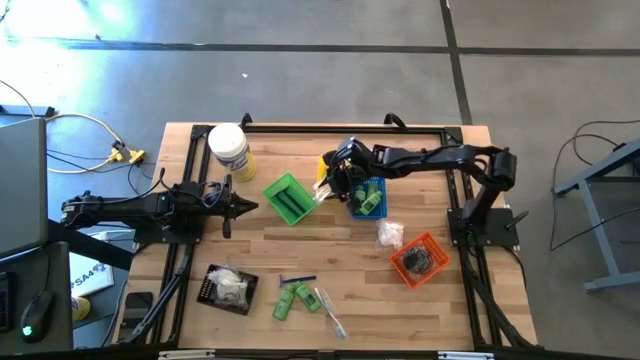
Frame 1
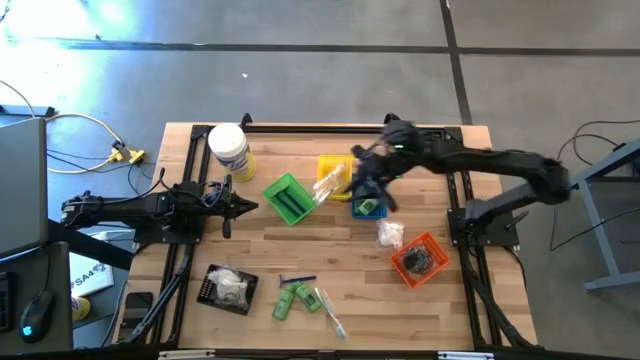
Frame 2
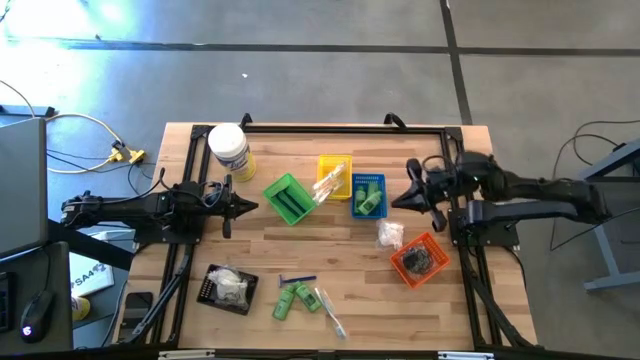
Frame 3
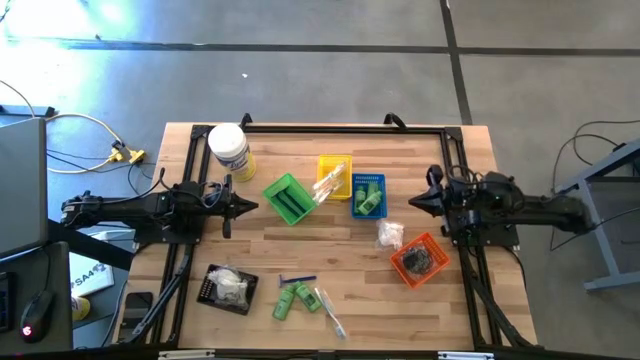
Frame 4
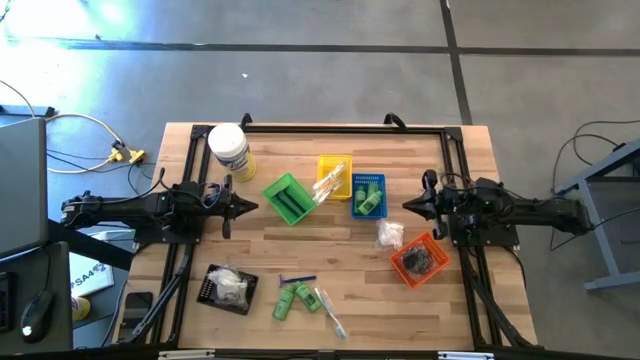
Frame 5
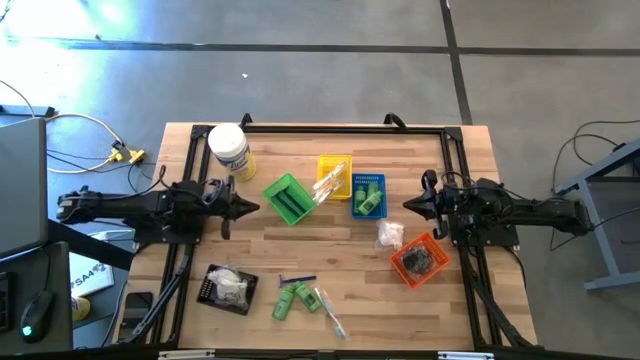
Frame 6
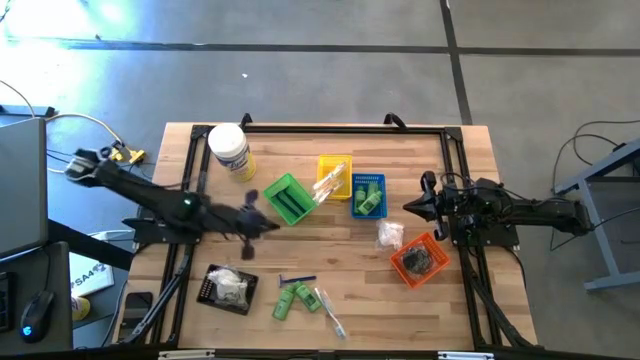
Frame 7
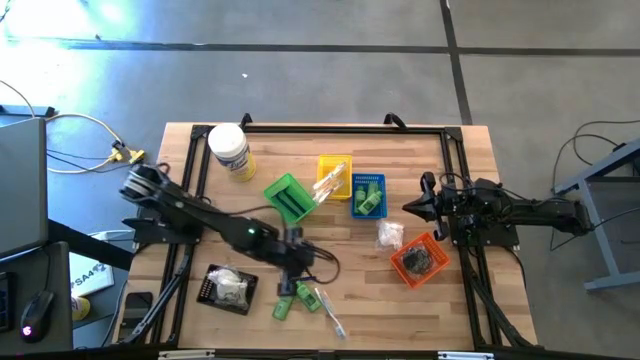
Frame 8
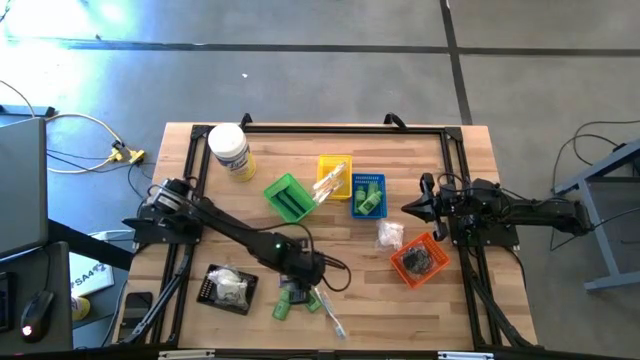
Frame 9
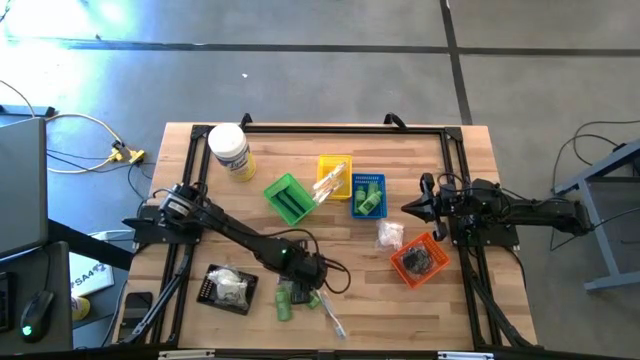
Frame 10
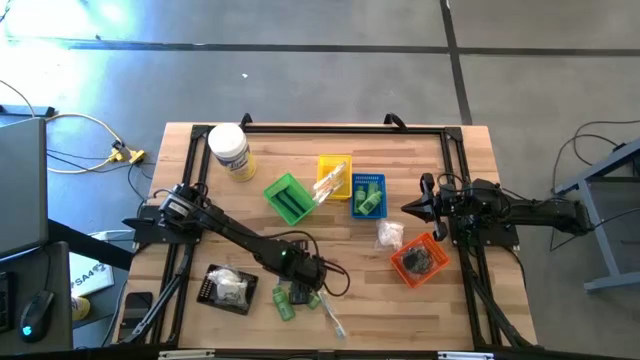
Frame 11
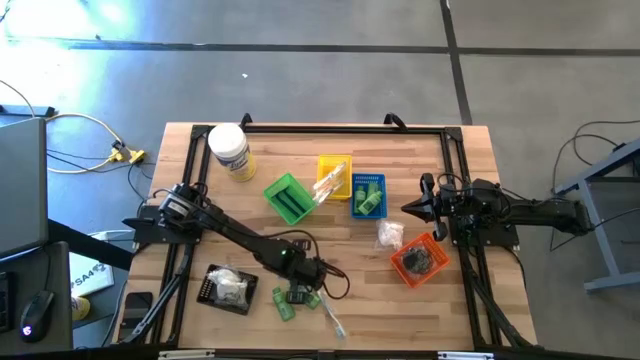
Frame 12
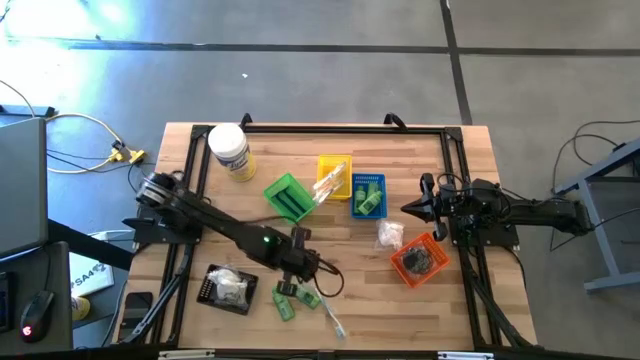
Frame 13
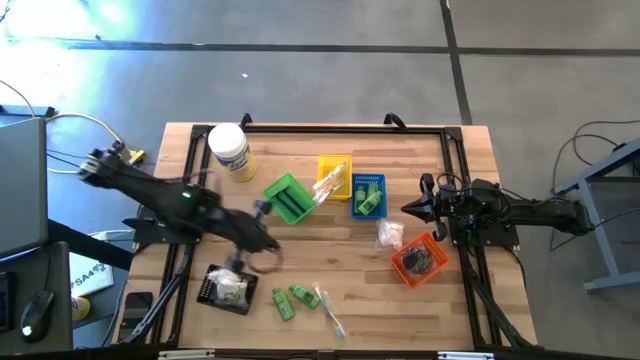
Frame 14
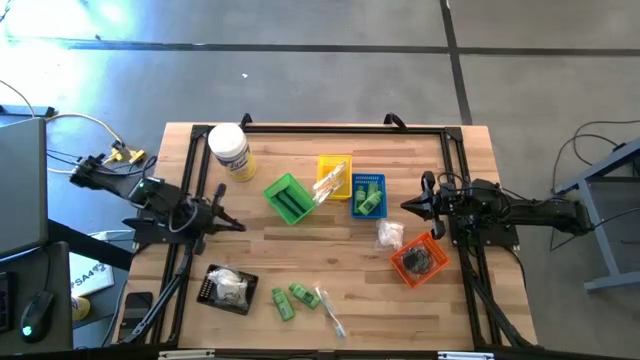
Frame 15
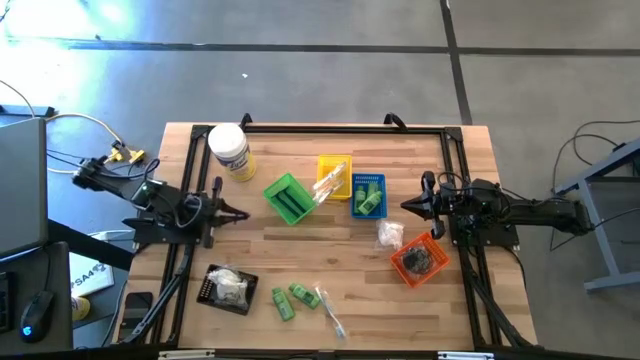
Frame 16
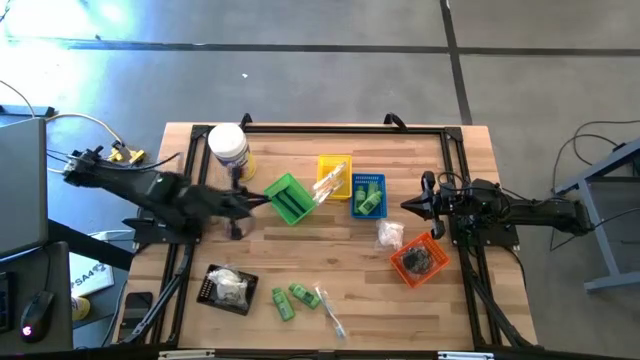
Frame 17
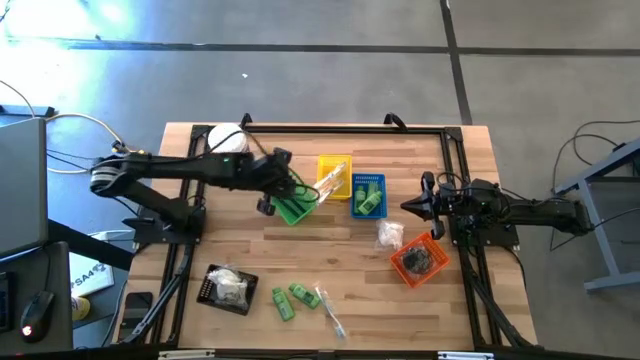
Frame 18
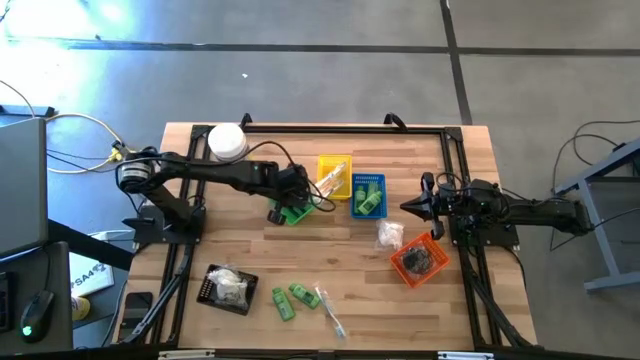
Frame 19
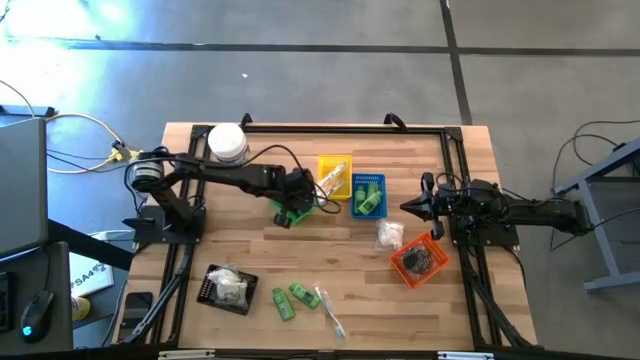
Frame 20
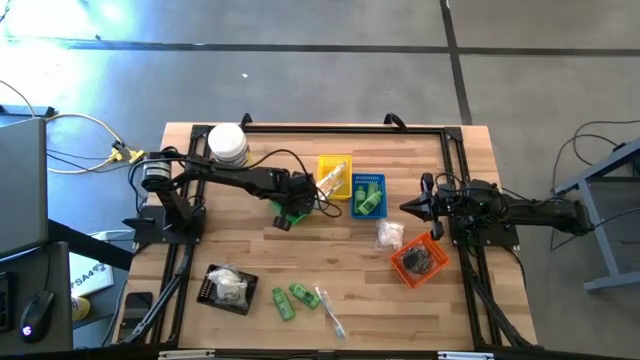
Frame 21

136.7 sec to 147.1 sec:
Task: Pick & Place Travel size toiletries
Put the blue razor into the green basket

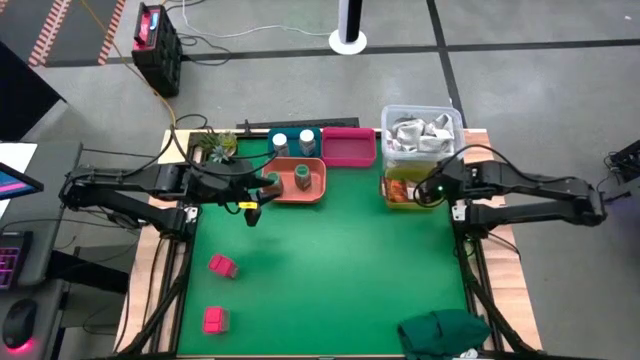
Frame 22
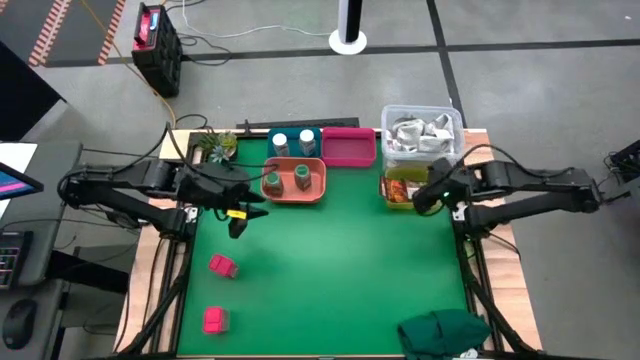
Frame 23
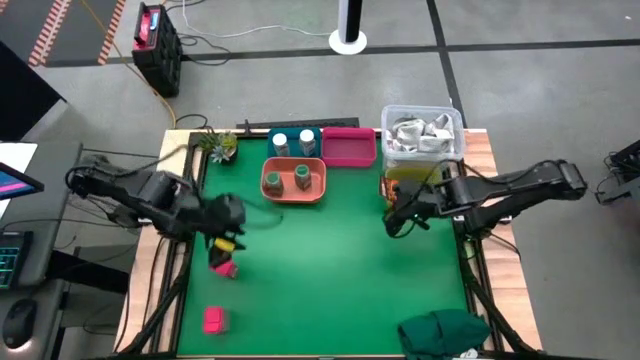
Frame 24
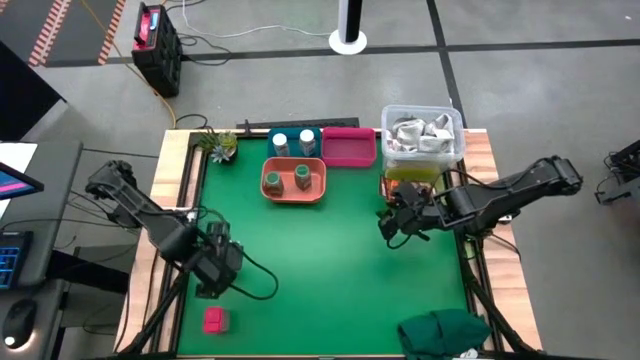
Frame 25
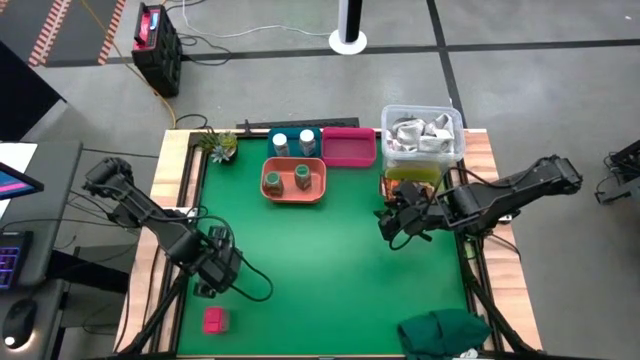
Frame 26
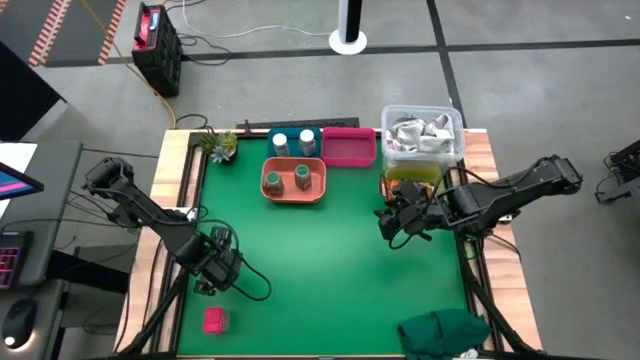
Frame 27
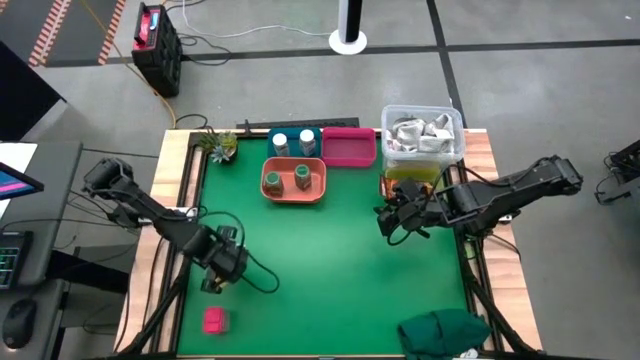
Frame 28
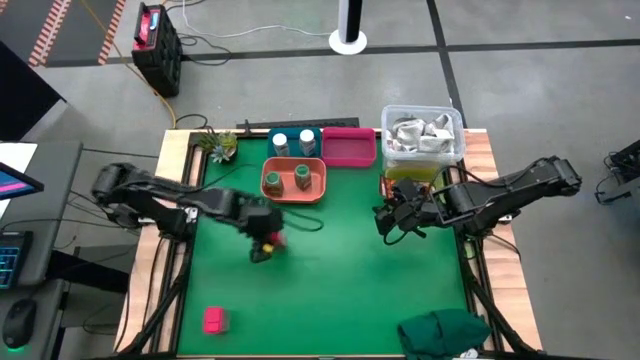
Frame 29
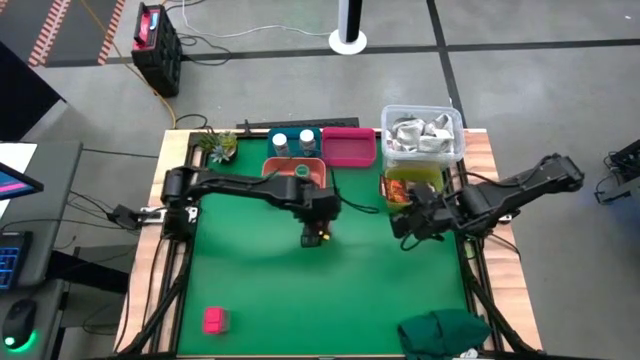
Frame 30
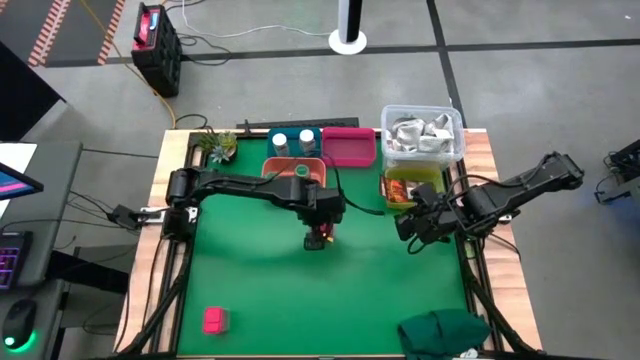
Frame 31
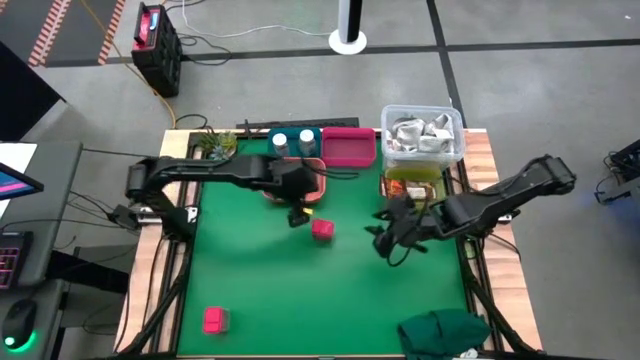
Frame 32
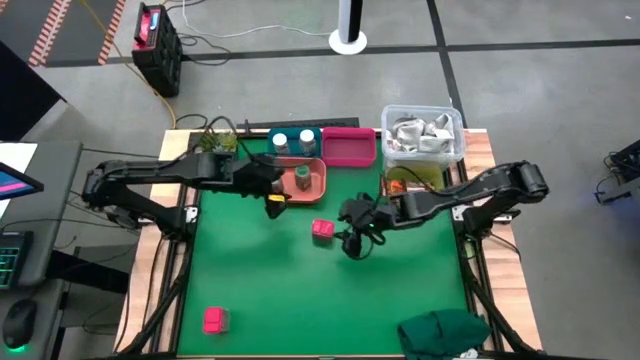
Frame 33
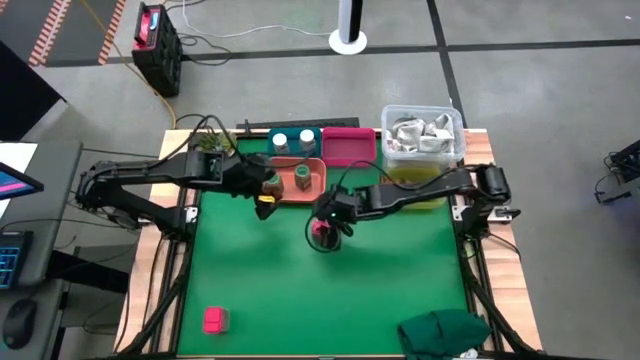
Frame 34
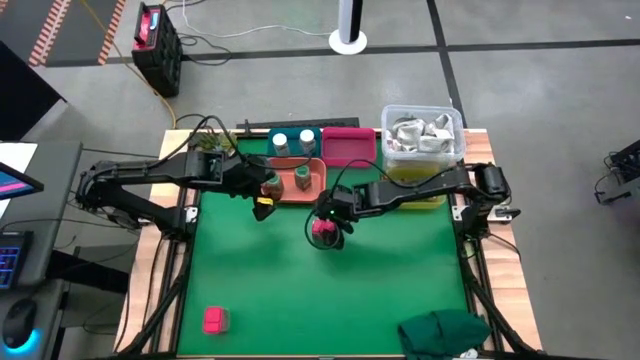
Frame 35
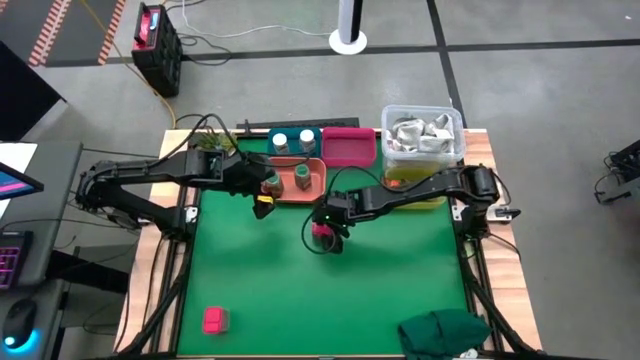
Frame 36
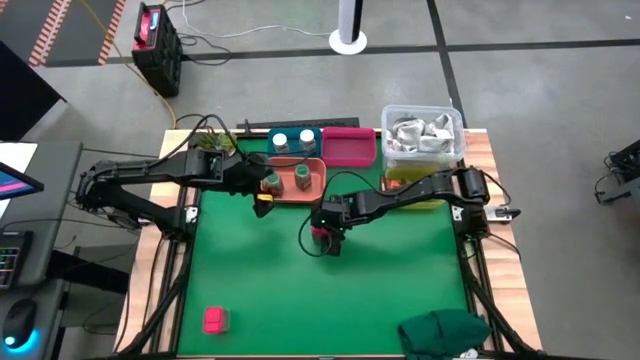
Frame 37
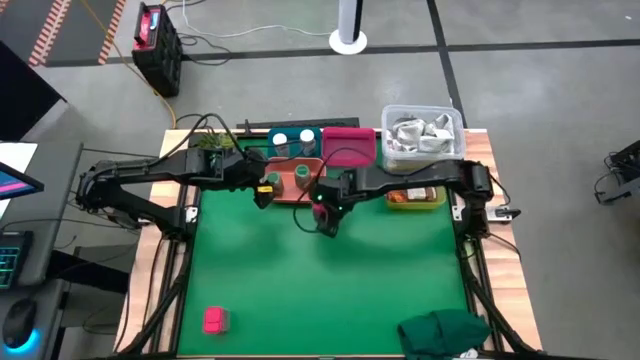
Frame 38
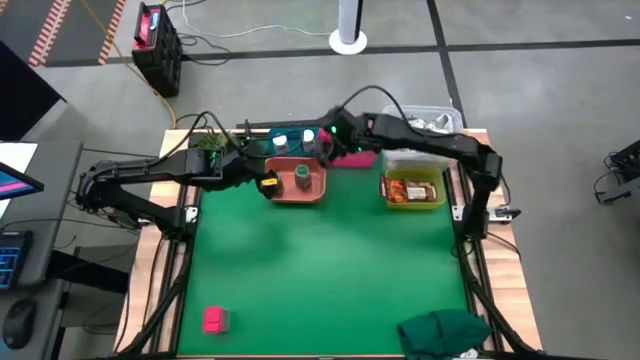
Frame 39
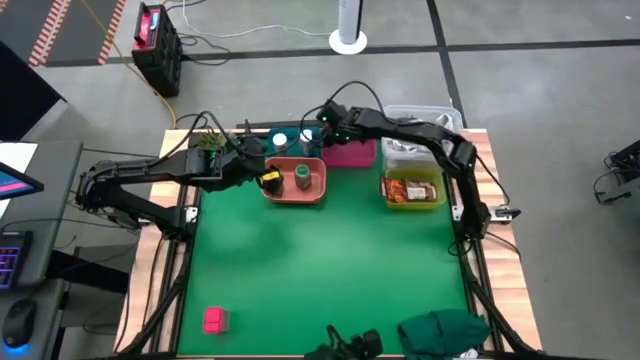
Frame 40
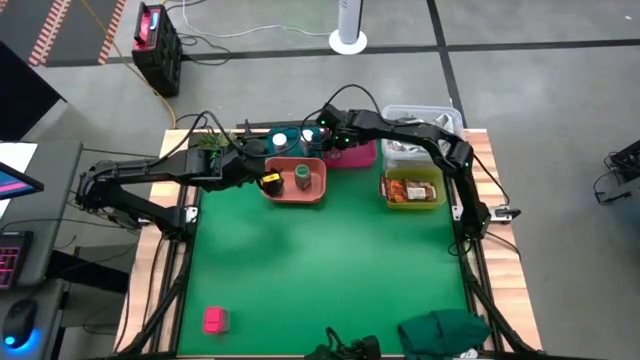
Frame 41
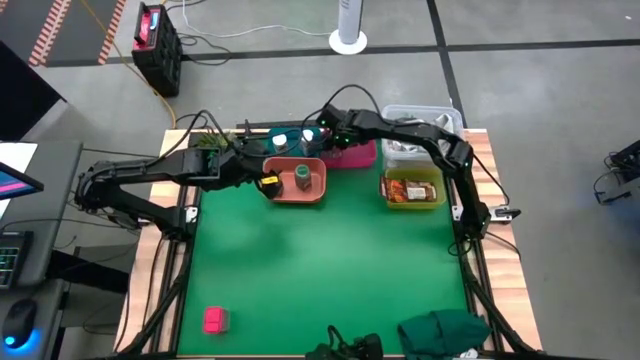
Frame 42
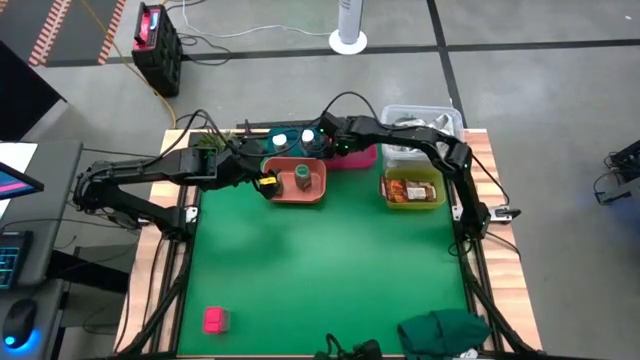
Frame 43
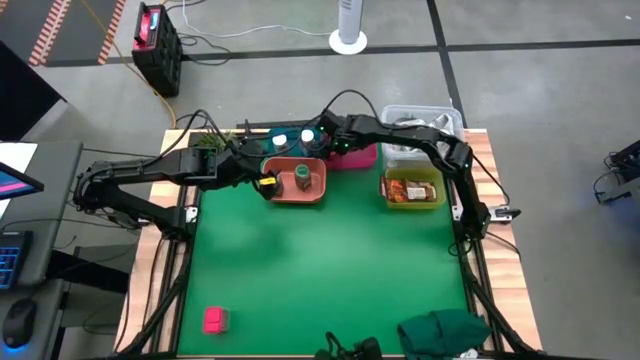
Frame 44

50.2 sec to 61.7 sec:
Task: Sort spices by type
Put the top red seasoning can into the pink bin
